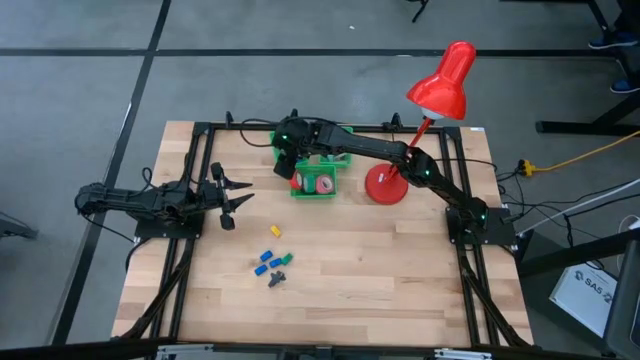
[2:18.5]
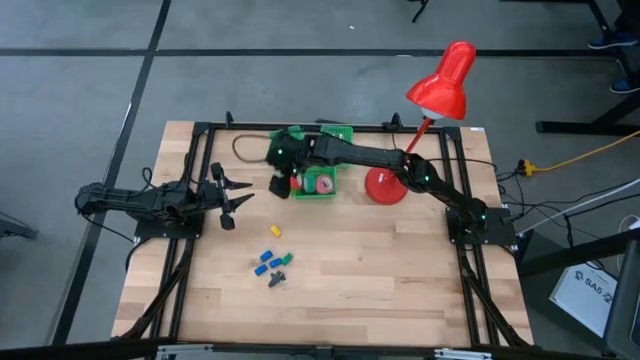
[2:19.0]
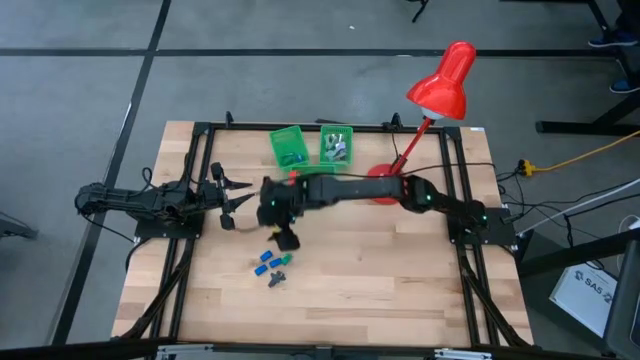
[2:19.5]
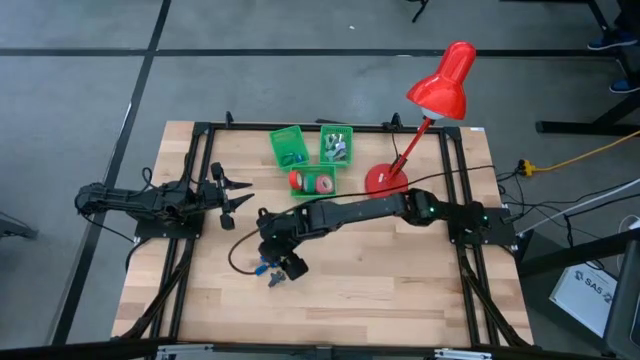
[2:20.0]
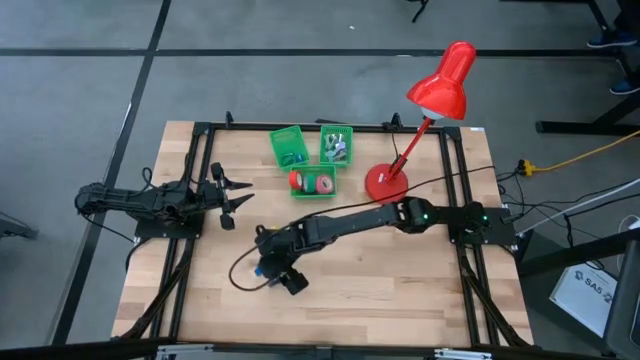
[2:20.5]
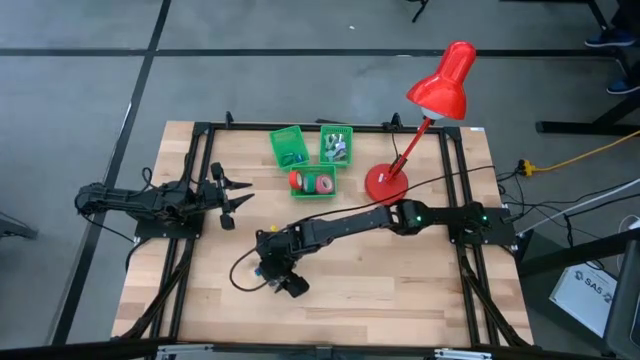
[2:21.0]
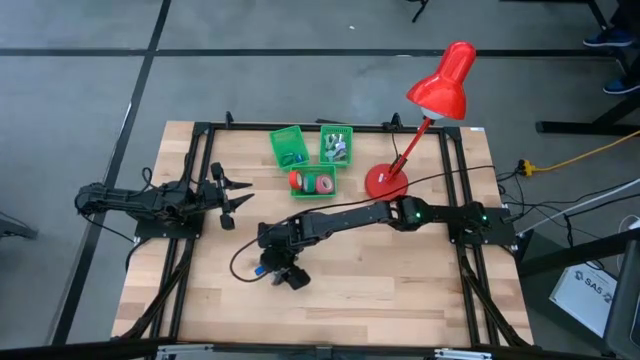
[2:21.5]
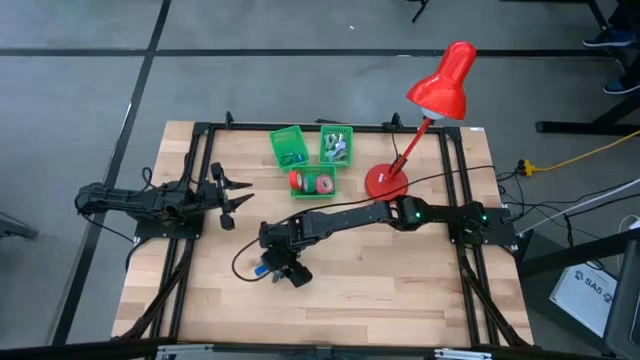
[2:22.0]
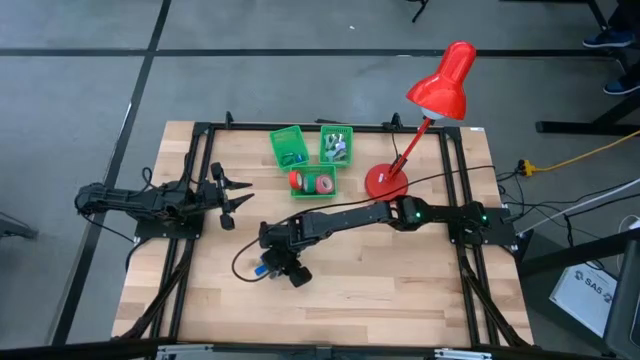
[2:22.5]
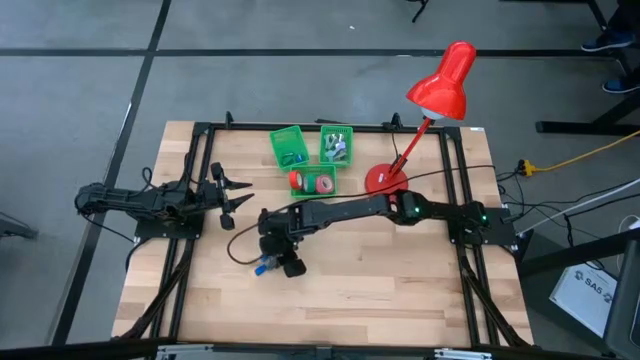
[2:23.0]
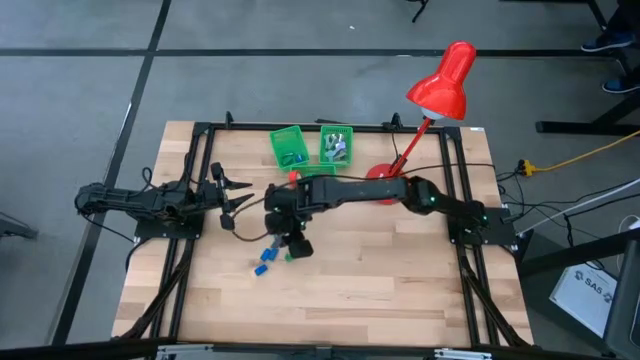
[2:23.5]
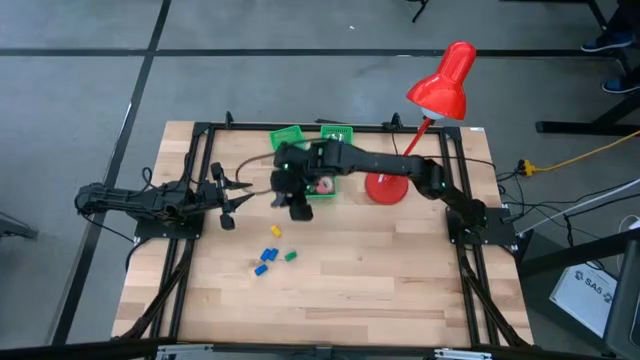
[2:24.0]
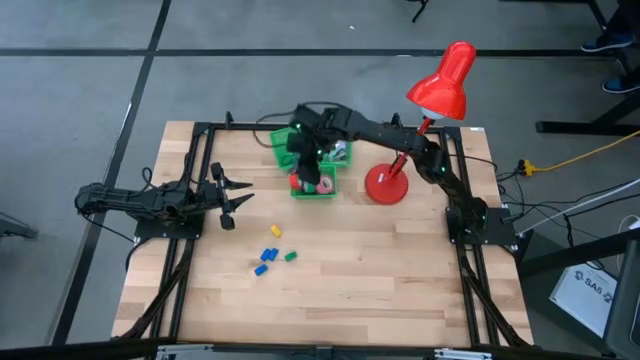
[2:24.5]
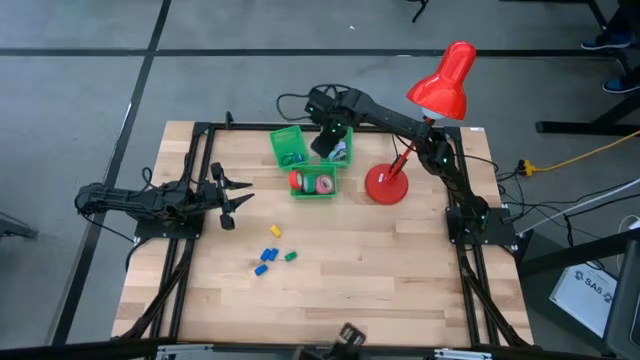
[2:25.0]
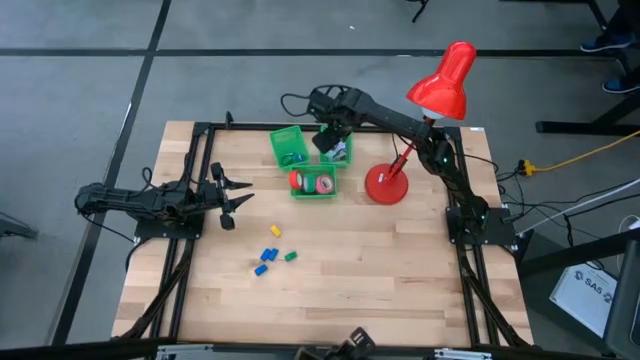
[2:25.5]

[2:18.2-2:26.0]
Task: Pick and place Stapler, Stapler remover, tape
Put the black staple remover into the right green bin

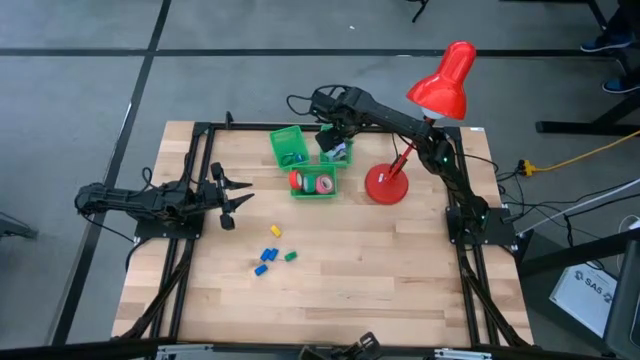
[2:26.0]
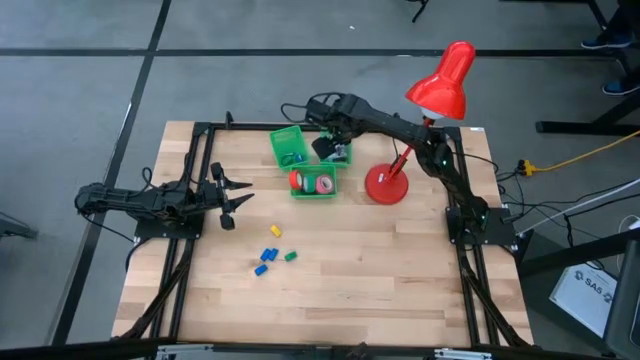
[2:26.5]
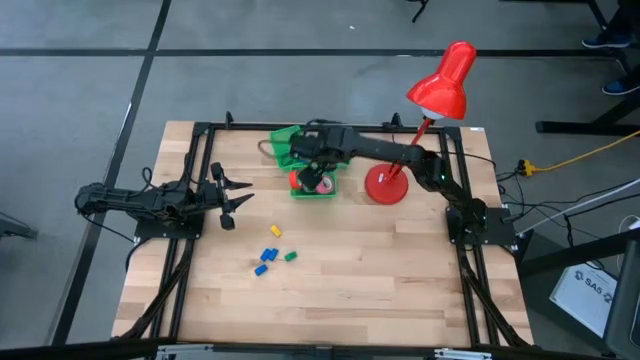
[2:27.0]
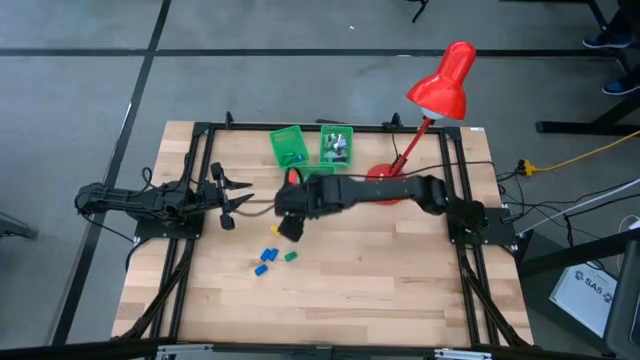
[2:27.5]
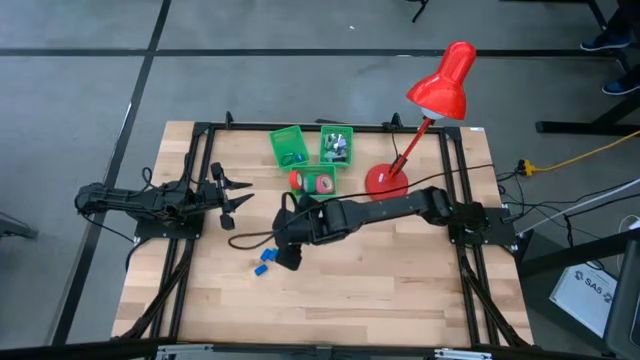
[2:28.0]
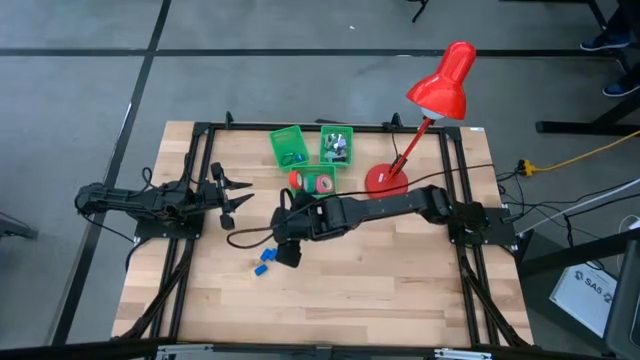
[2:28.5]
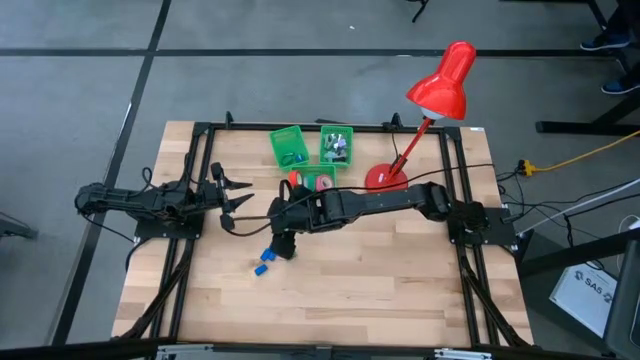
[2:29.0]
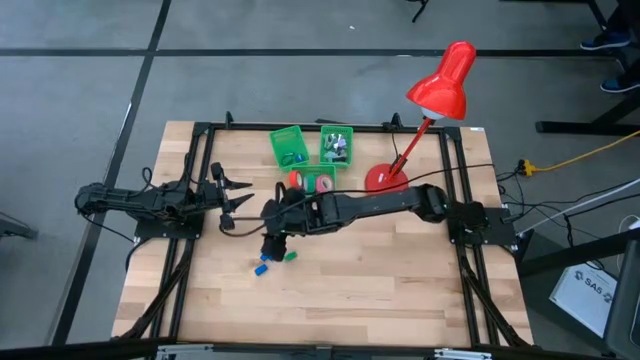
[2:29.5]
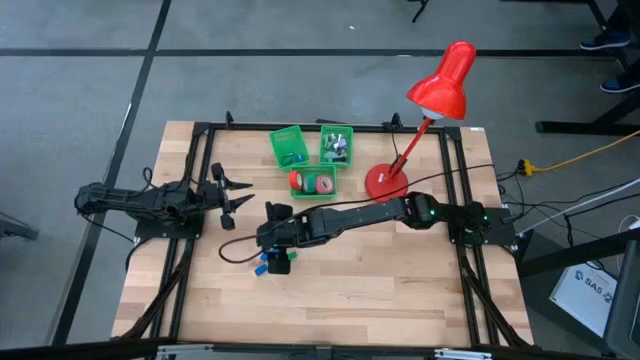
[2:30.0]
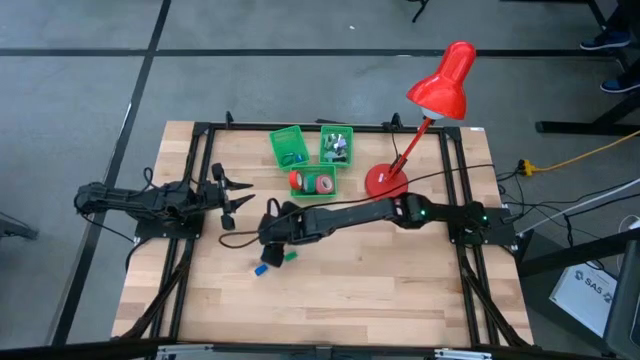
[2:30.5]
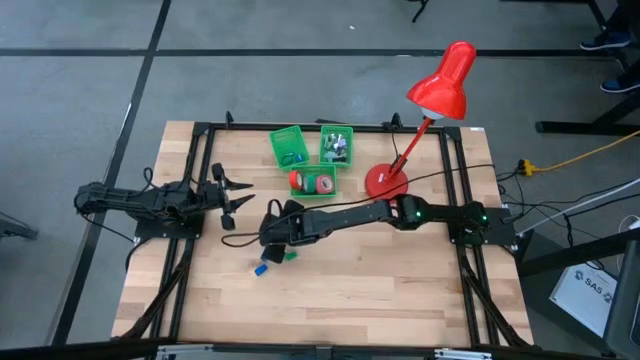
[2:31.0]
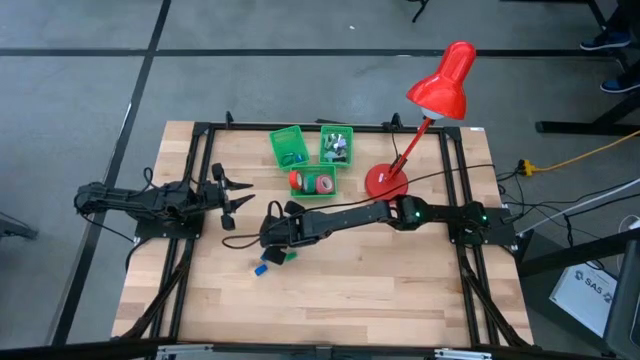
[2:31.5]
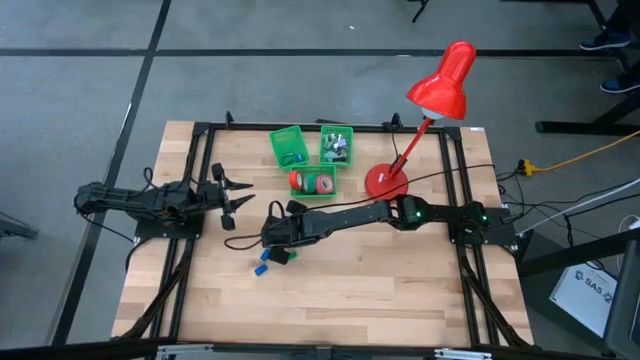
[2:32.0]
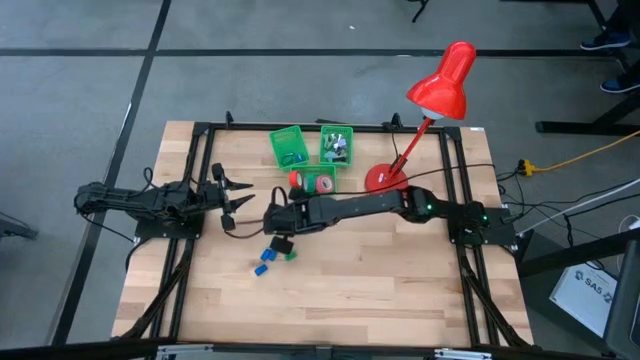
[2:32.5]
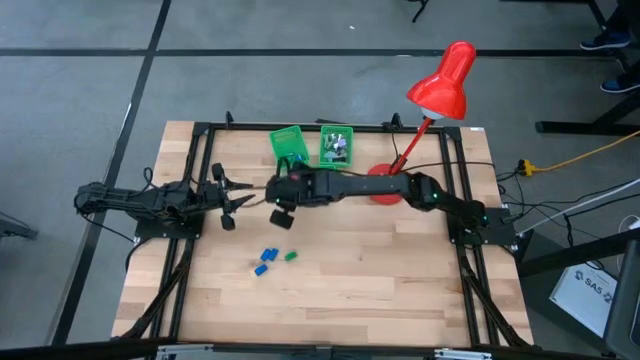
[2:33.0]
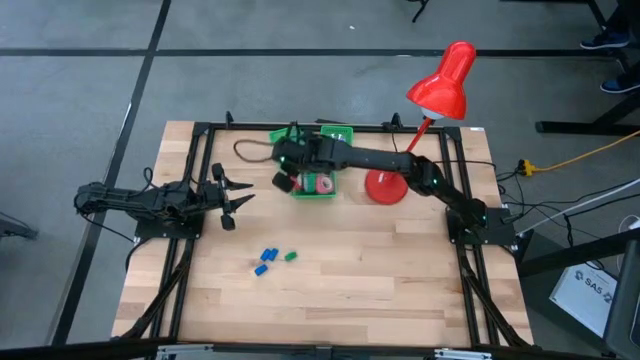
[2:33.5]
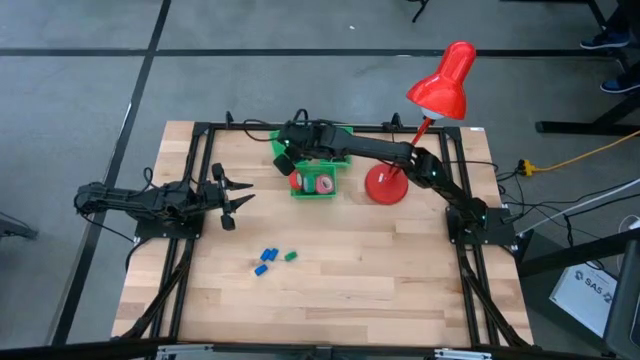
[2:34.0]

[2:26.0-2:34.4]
Put the yellow stapler into the left green bin

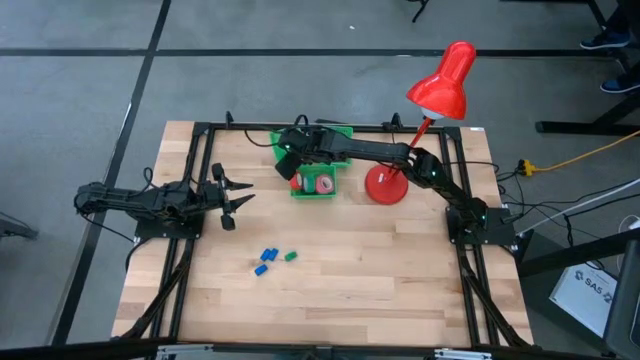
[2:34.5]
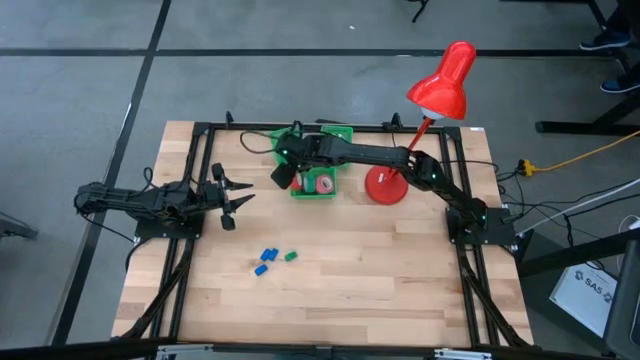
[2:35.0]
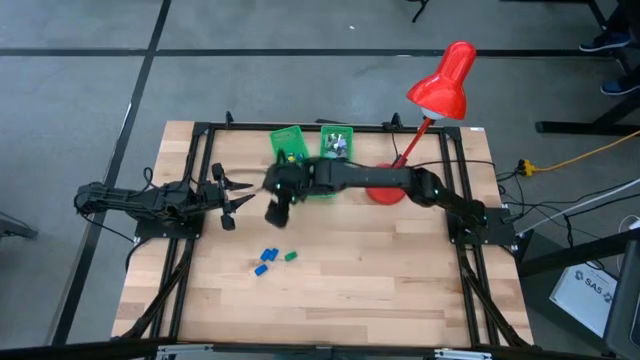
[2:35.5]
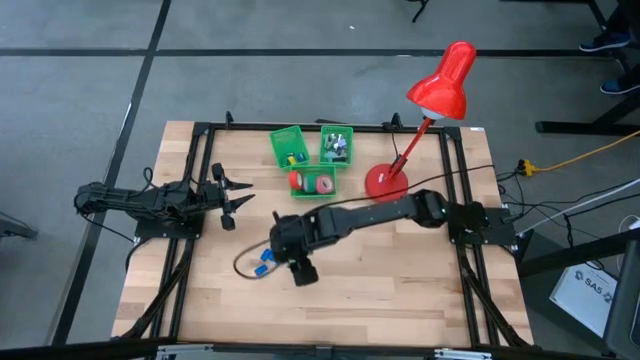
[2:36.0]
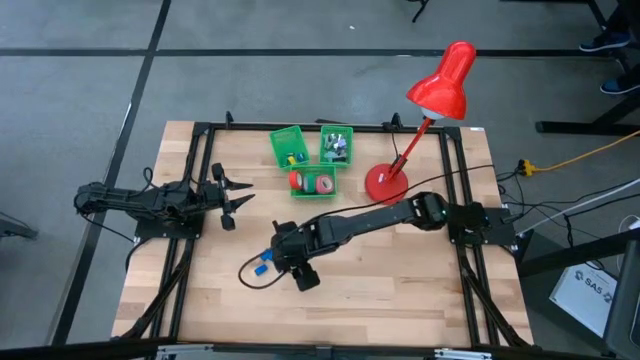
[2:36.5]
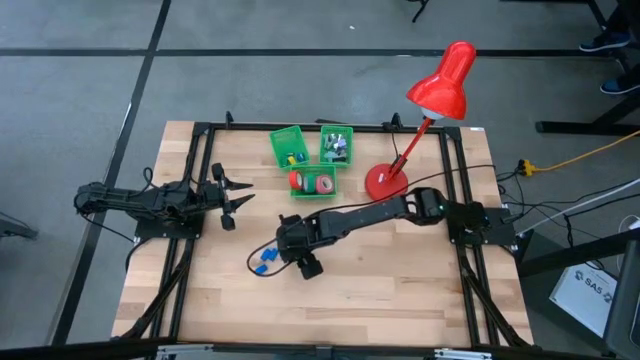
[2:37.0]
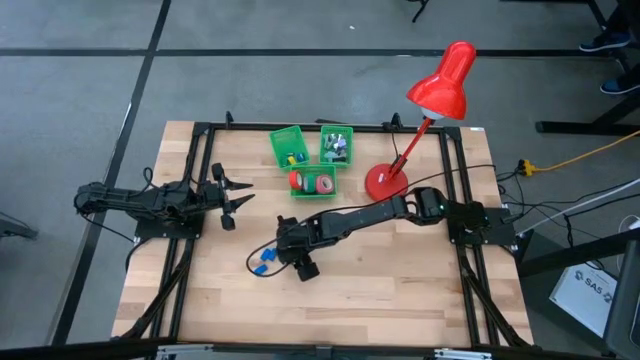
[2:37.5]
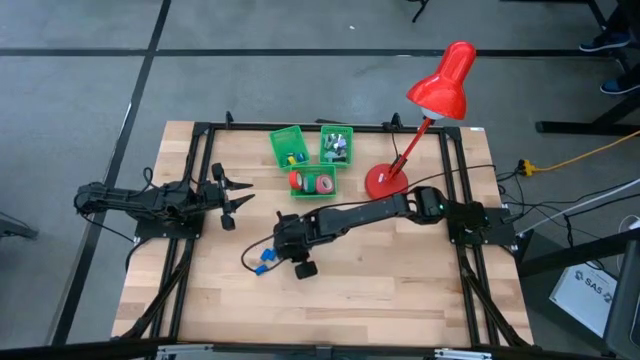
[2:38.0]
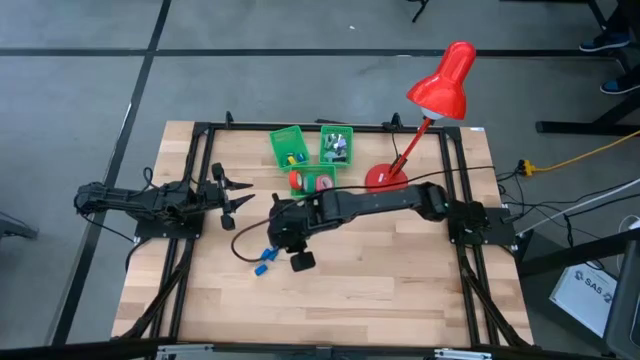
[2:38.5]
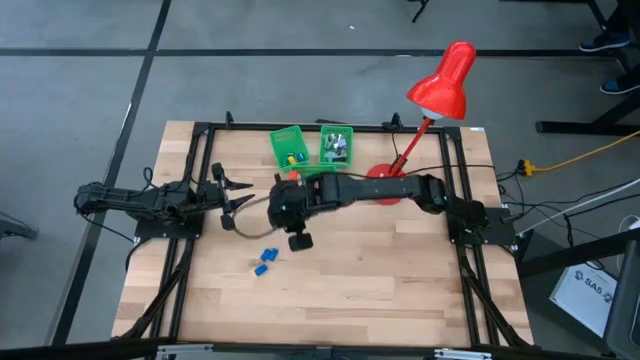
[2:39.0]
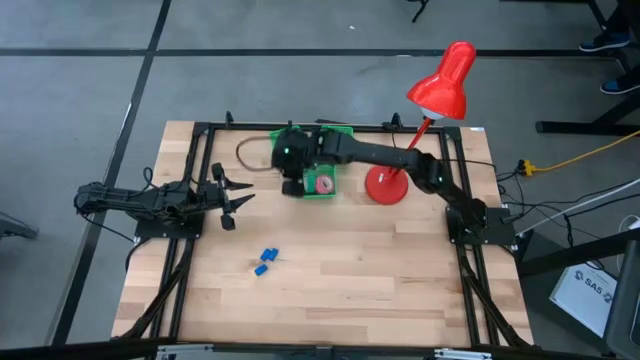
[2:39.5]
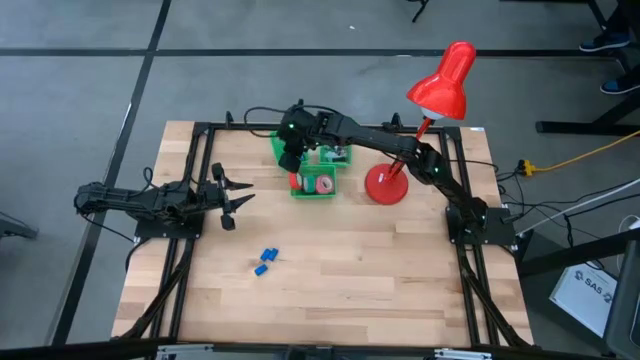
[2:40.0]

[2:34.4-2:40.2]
Put the green stapler into the left green bin
